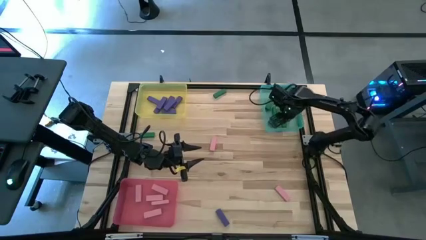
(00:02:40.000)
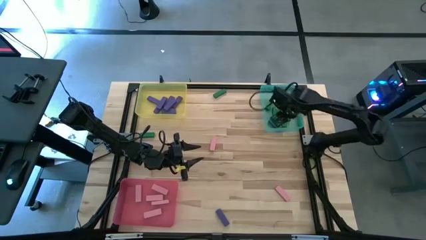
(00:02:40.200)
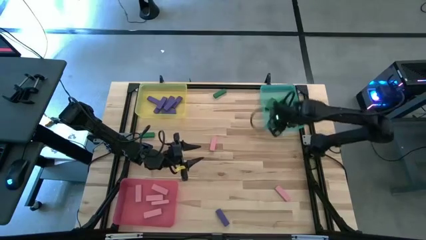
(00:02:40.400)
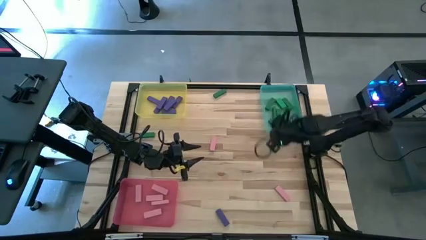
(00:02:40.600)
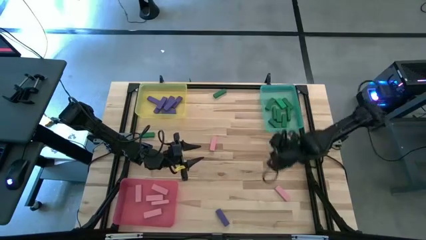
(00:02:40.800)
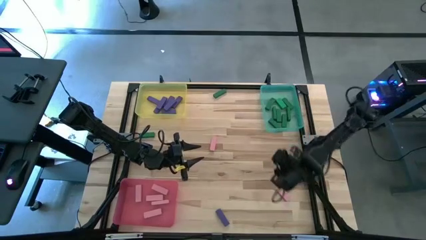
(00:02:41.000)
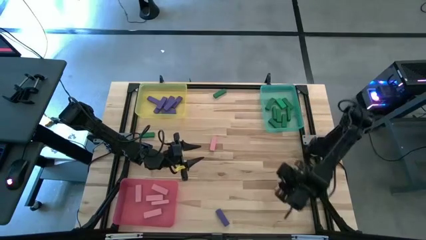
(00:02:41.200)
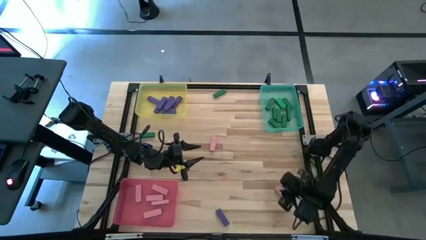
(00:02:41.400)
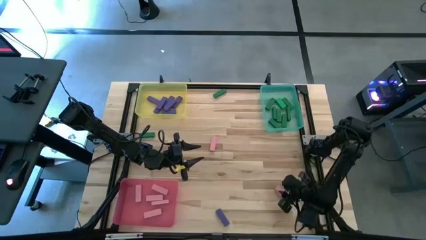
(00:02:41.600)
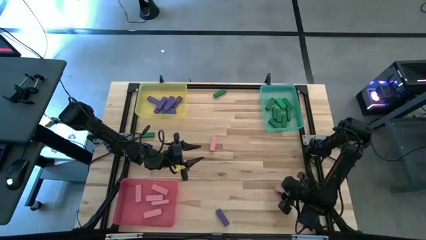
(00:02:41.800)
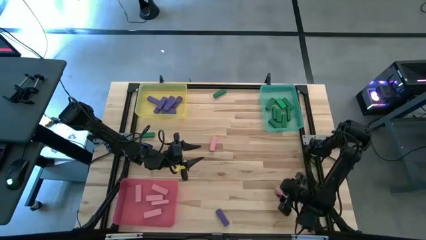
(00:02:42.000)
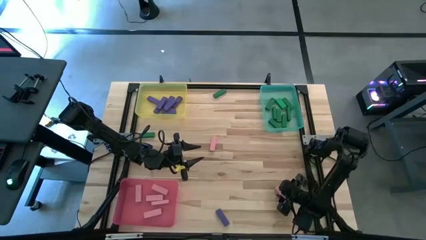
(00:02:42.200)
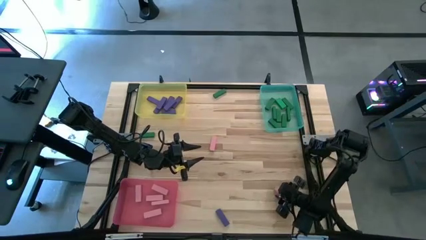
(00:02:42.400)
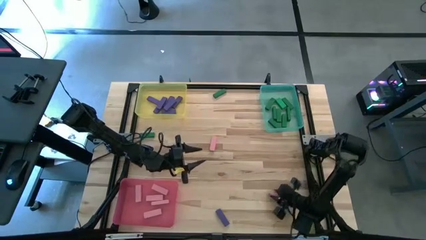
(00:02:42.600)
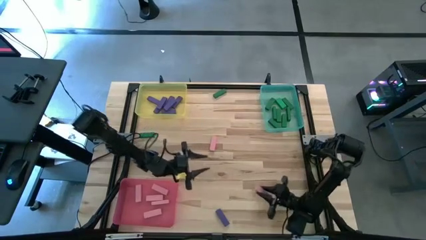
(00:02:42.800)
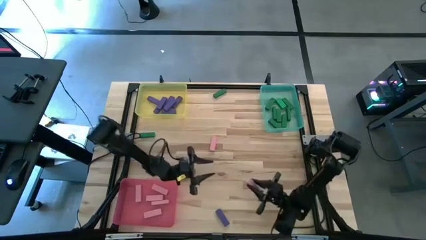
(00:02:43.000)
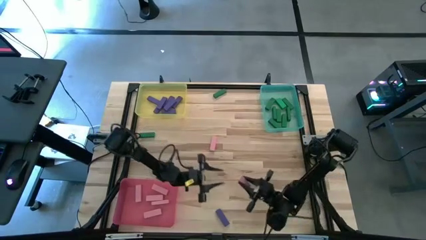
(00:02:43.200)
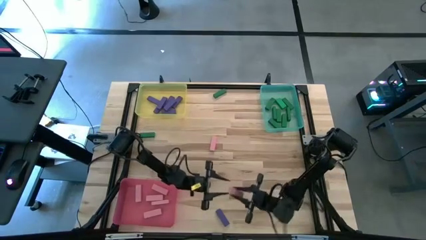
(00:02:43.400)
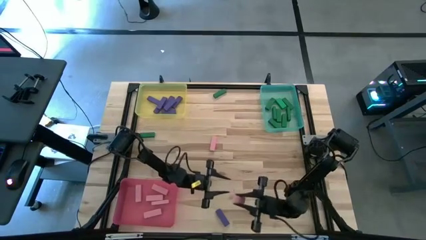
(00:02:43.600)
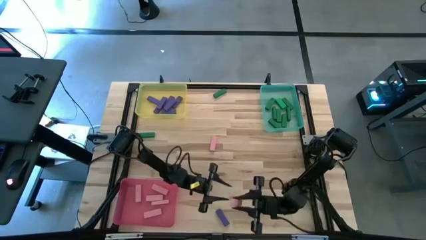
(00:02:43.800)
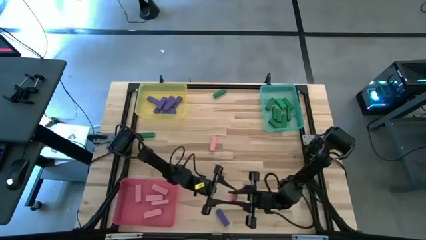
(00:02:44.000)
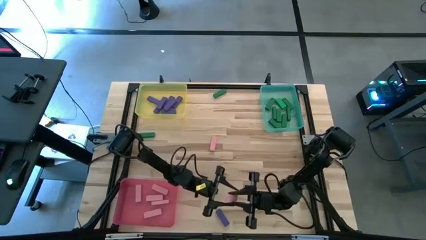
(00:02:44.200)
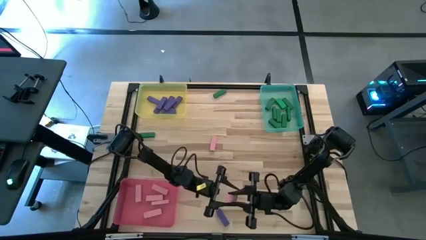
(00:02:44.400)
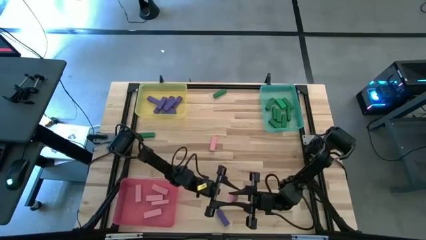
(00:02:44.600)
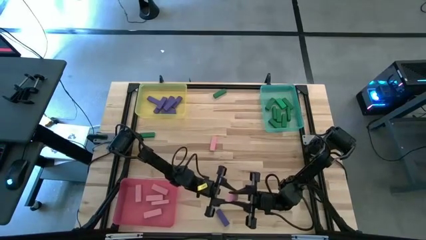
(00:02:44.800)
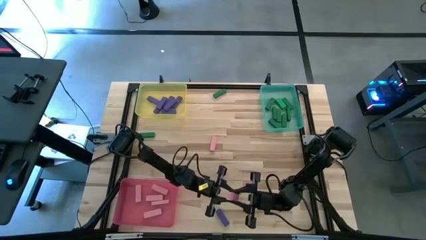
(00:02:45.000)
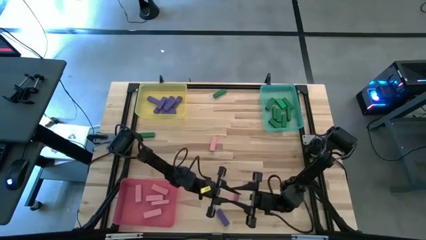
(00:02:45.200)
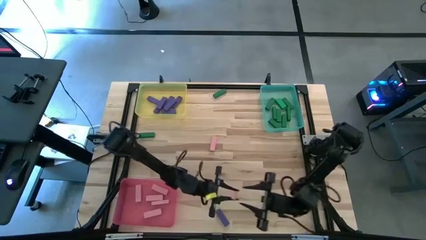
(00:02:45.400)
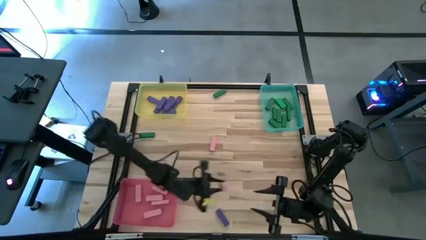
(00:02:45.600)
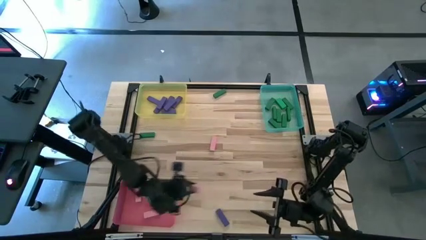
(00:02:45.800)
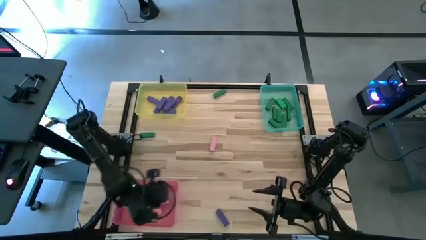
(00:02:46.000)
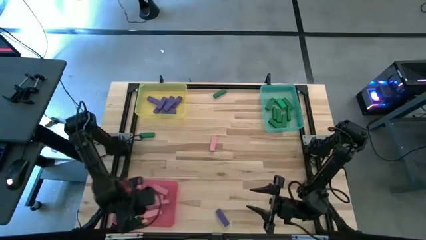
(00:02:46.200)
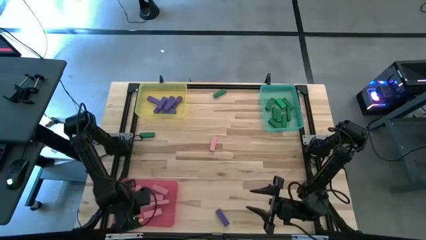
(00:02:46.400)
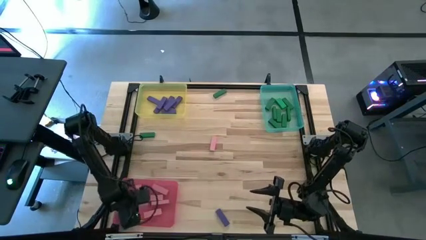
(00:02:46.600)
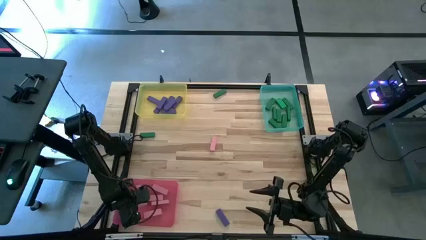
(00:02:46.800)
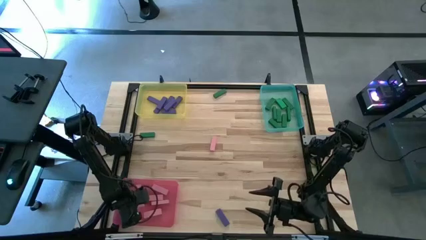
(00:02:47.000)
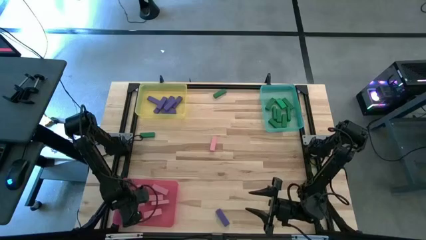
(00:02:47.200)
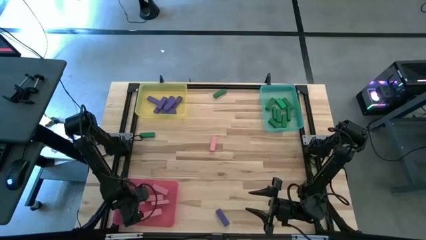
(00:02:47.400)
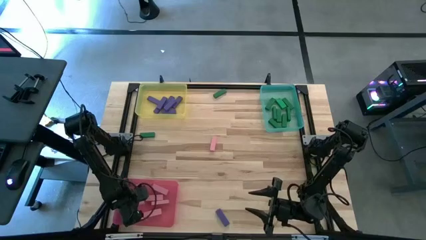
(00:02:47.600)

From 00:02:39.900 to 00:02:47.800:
Task: Sort blocks
Put the pink wooden block into the pink bin

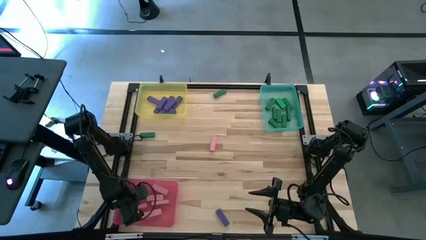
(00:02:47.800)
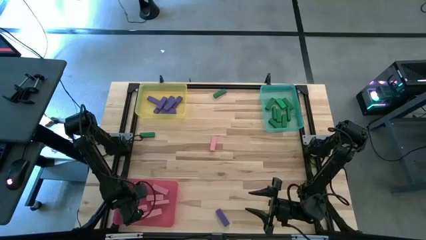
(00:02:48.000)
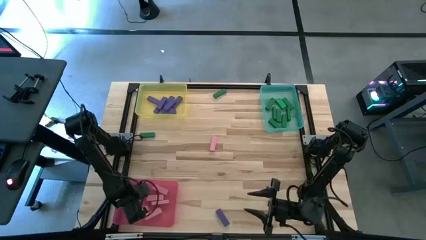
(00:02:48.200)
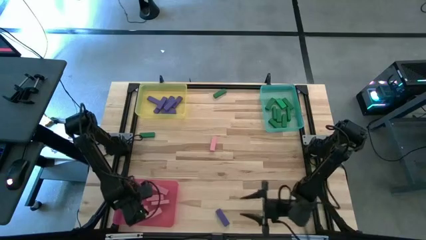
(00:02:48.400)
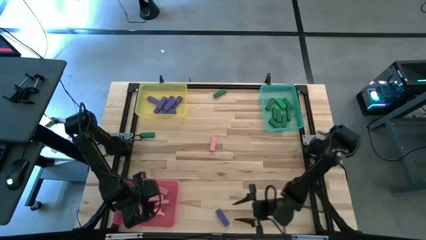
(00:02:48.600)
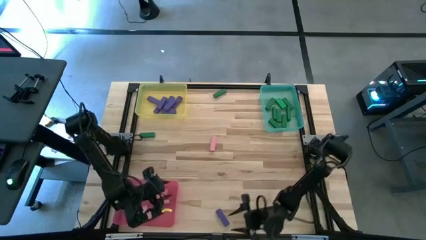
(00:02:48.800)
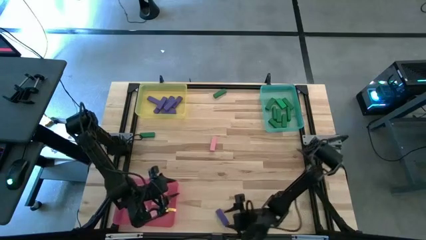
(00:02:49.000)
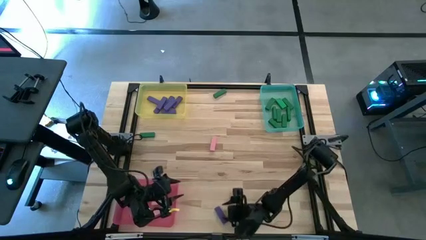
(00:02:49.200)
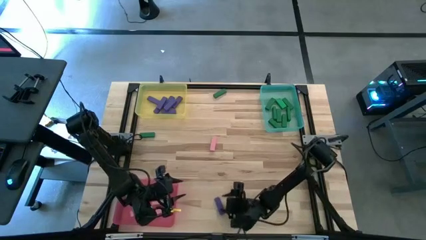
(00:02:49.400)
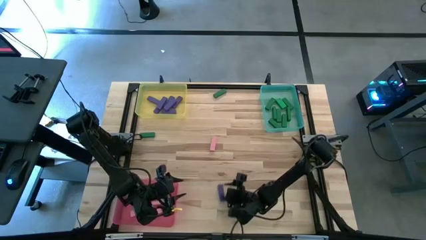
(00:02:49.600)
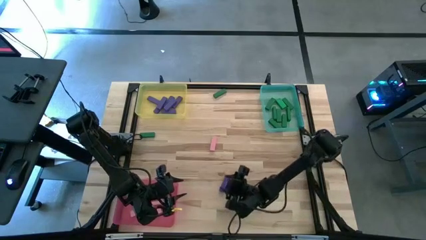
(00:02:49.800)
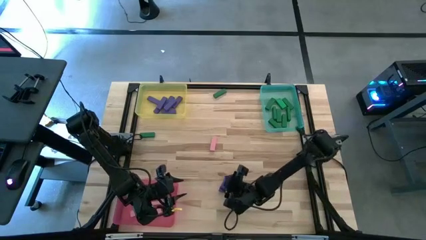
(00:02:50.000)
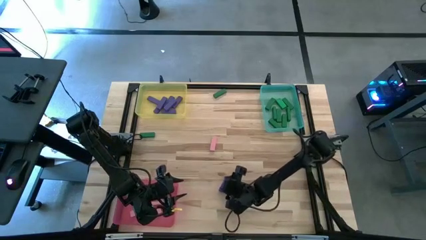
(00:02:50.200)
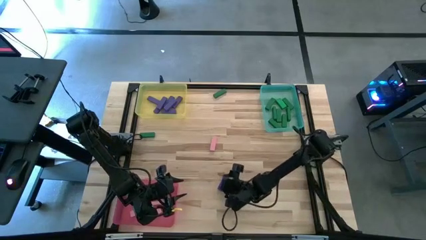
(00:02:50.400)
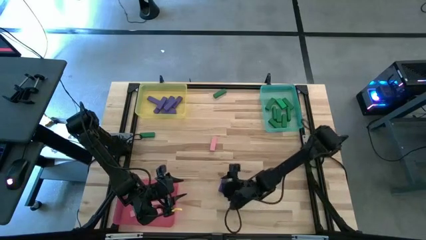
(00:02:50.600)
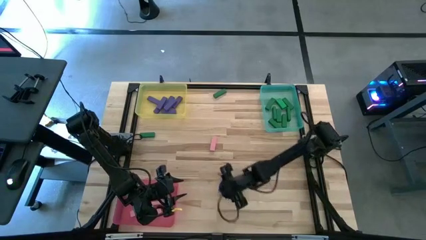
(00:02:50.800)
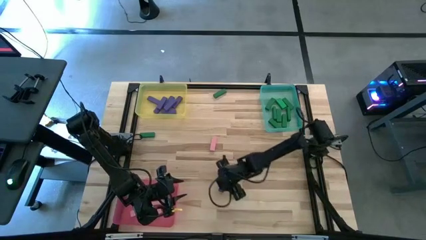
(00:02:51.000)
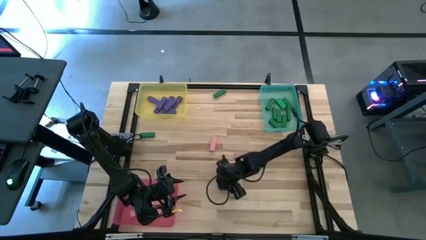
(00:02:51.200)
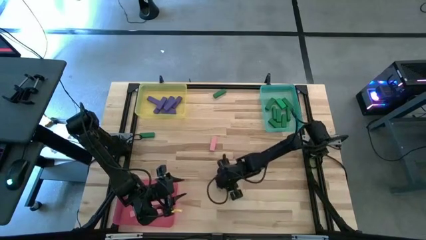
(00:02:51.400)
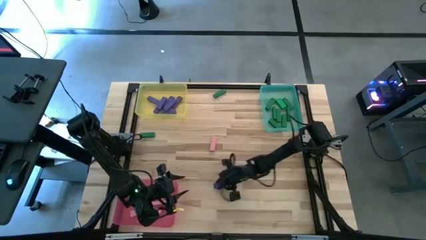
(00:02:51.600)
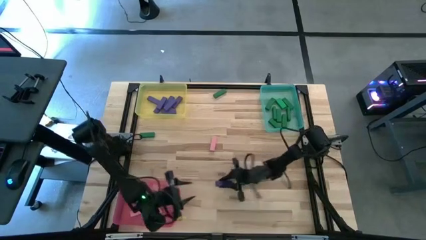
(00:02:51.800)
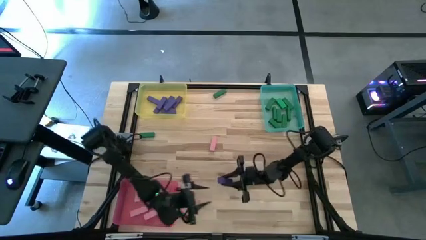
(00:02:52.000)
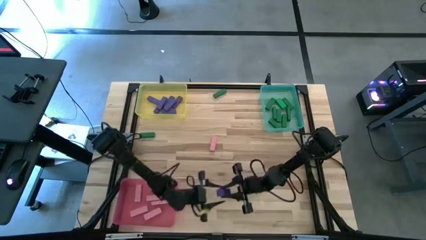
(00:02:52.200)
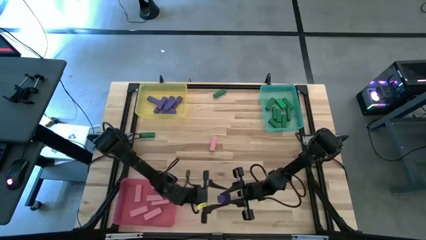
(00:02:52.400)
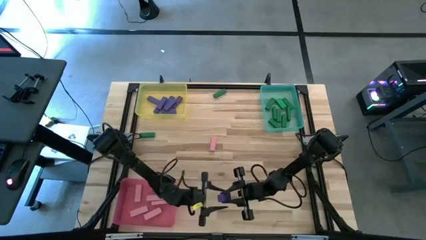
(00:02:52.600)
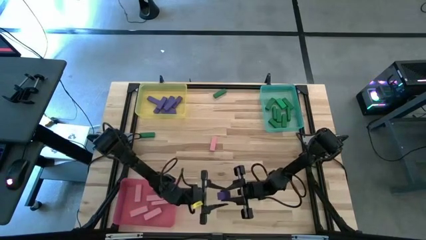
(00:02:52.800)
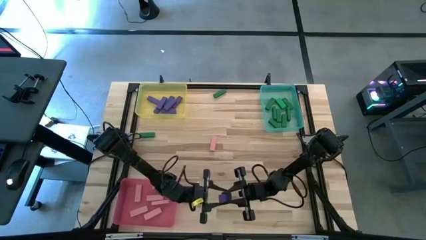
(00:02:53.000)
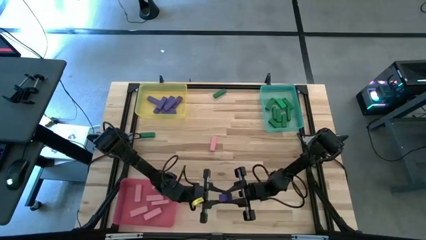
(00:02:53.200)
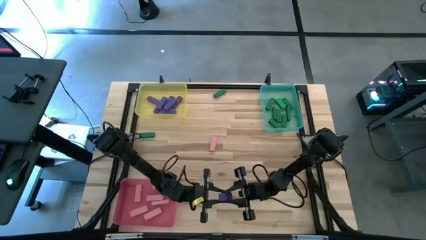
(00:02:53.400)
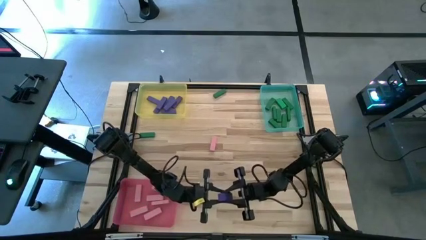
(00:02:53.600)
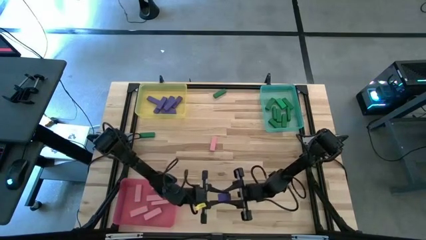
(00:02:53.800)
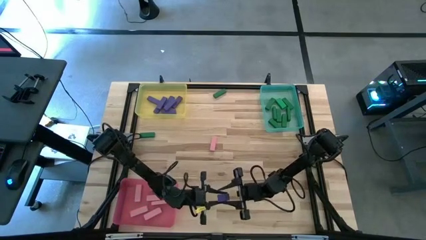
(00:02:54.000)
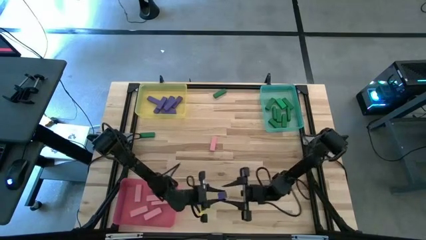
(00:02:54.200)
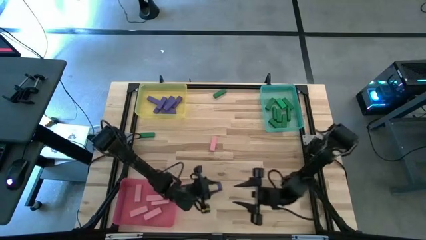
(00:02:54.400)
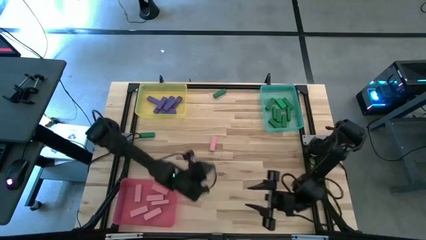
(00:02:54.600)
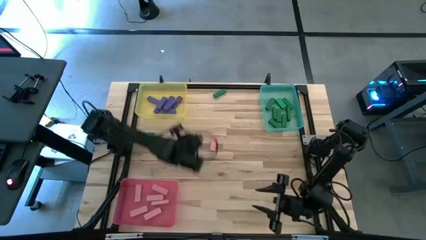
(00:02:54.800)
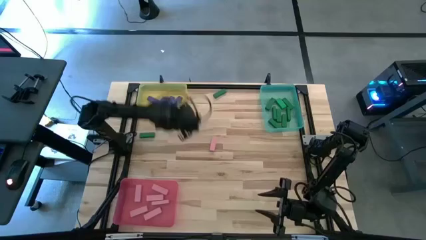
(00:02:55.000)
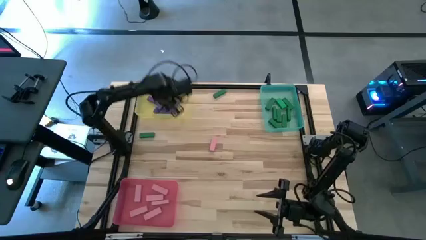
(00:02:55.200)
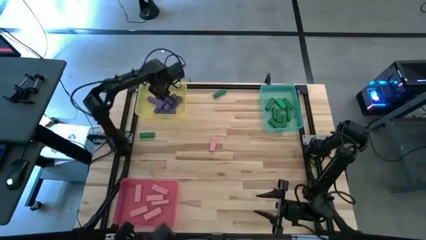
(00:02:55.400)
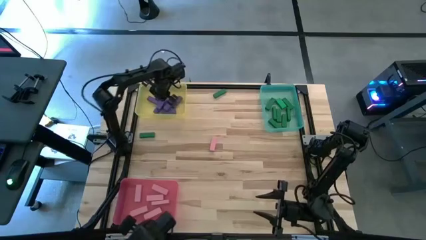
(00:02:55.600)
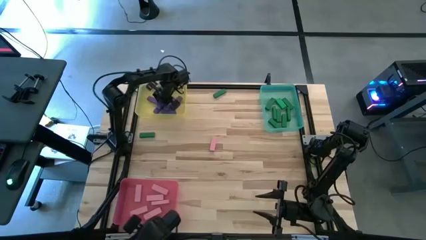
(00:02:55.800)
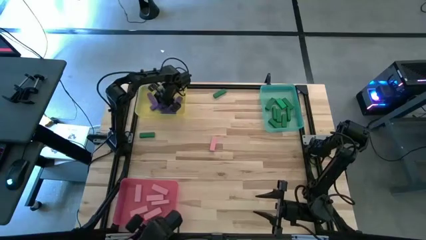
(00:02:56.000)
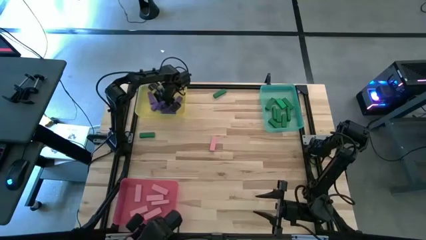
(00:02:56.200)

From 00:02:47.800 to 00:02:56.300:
Put the purple wooden block into the yellow bin
